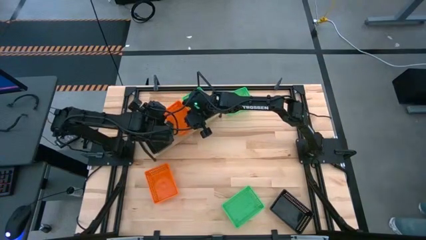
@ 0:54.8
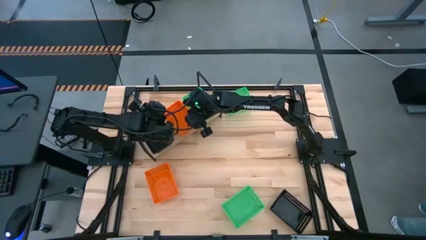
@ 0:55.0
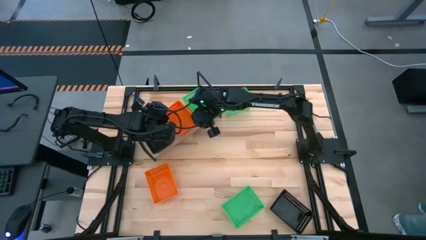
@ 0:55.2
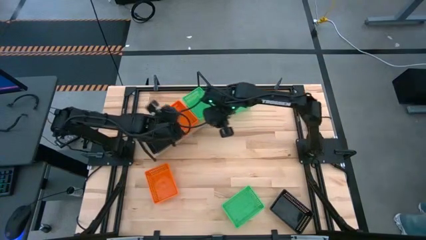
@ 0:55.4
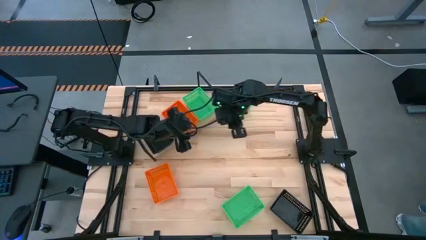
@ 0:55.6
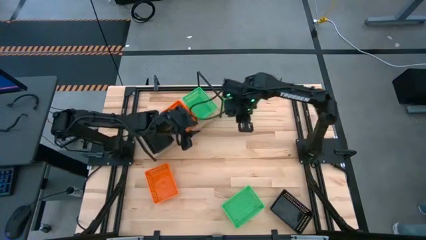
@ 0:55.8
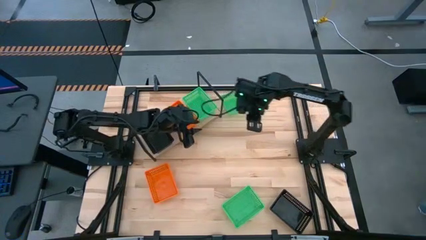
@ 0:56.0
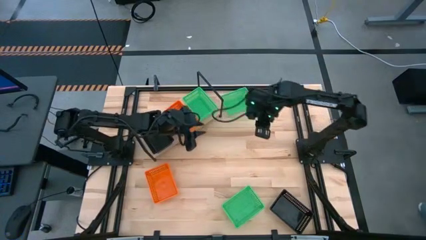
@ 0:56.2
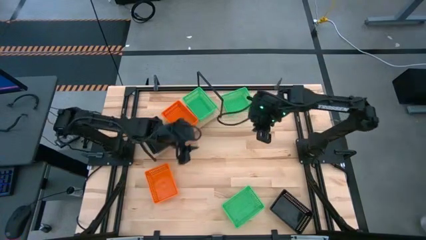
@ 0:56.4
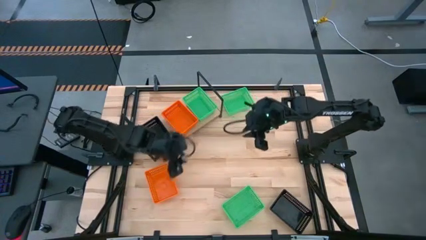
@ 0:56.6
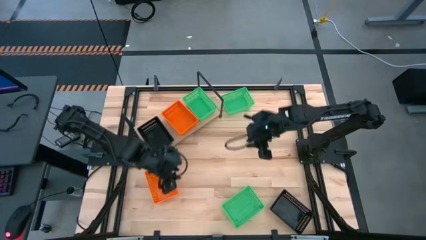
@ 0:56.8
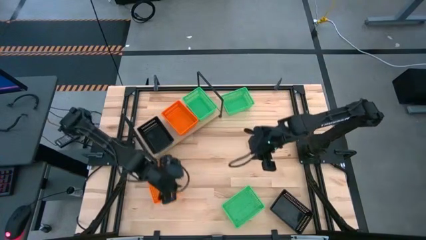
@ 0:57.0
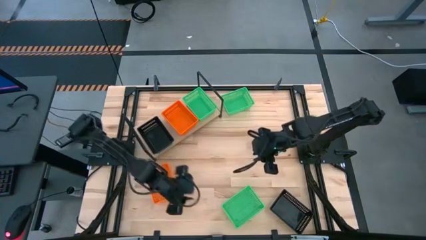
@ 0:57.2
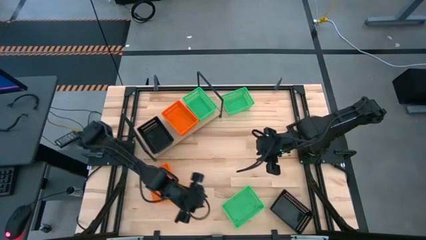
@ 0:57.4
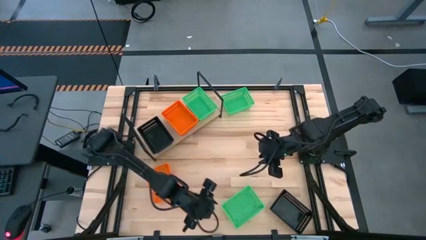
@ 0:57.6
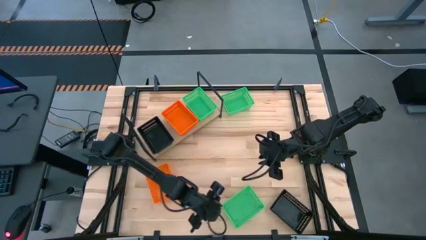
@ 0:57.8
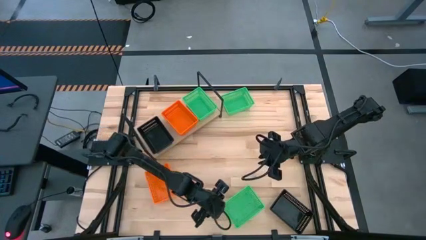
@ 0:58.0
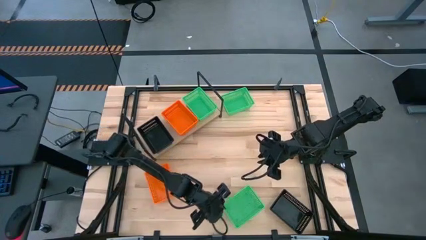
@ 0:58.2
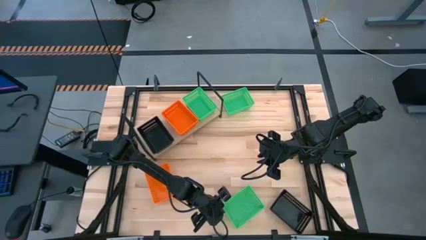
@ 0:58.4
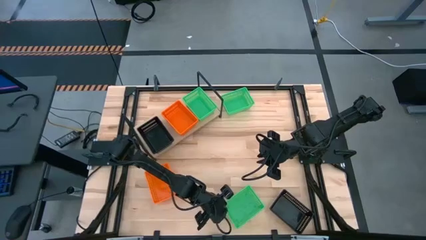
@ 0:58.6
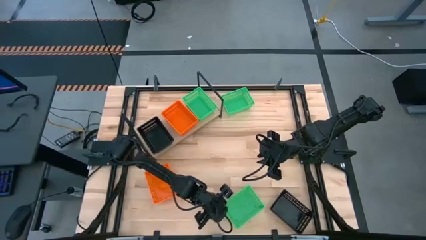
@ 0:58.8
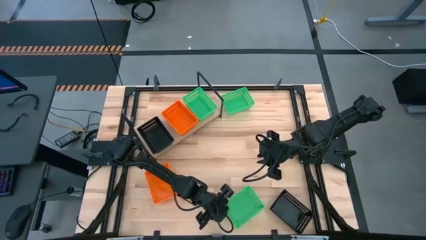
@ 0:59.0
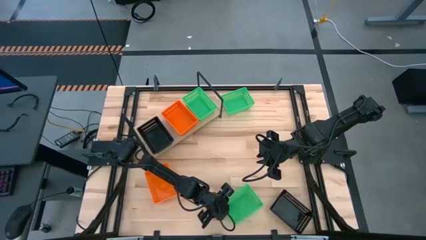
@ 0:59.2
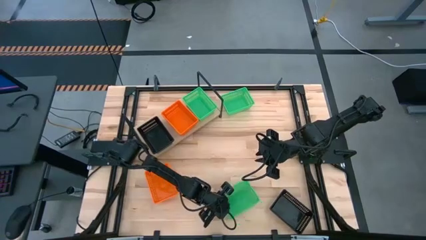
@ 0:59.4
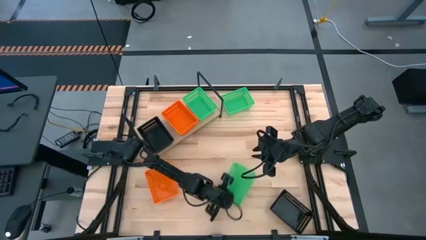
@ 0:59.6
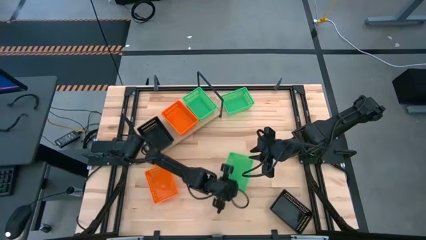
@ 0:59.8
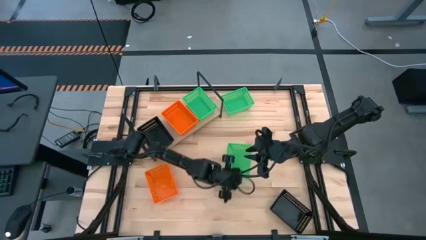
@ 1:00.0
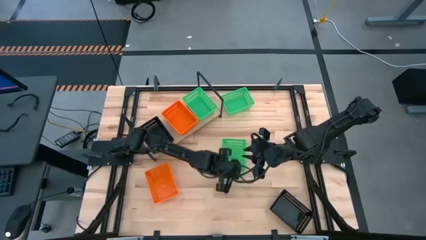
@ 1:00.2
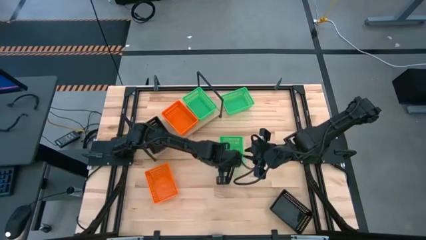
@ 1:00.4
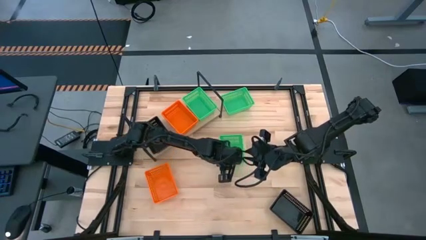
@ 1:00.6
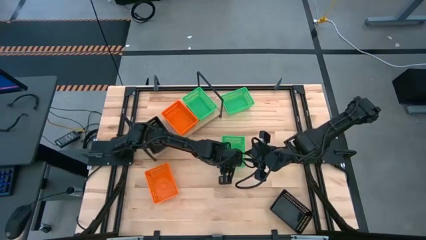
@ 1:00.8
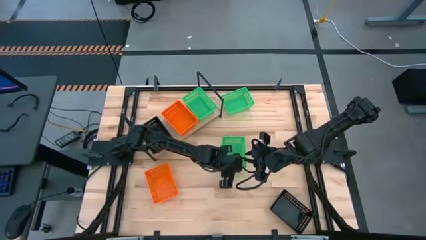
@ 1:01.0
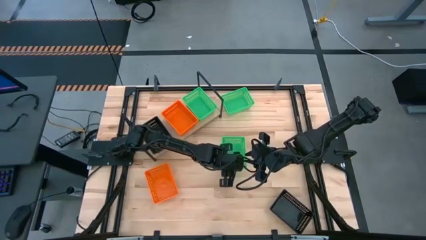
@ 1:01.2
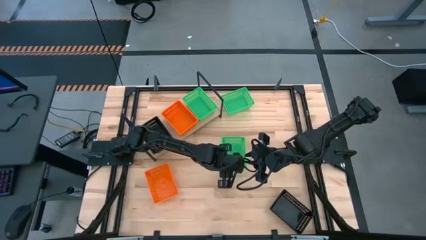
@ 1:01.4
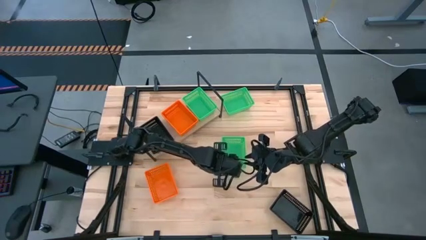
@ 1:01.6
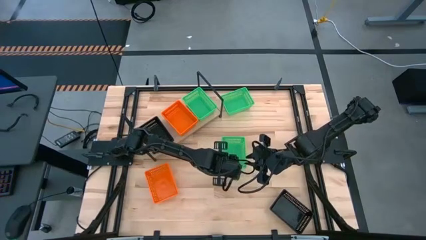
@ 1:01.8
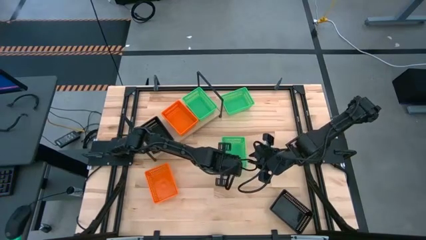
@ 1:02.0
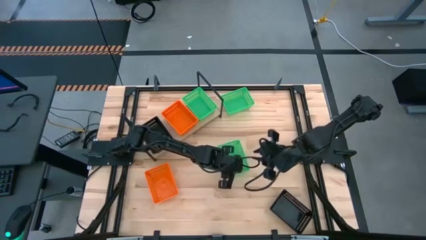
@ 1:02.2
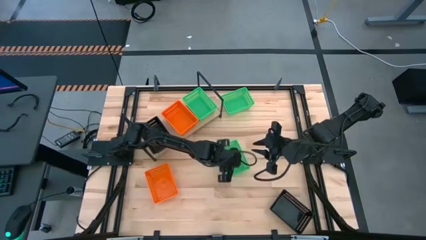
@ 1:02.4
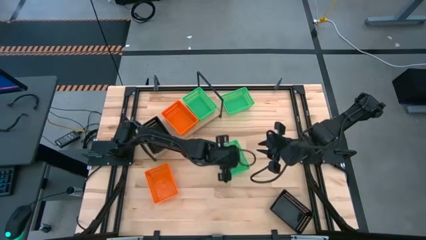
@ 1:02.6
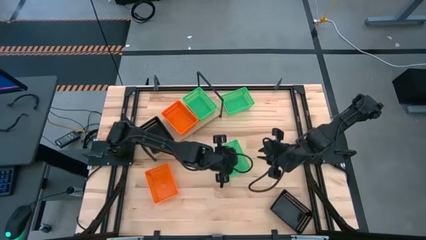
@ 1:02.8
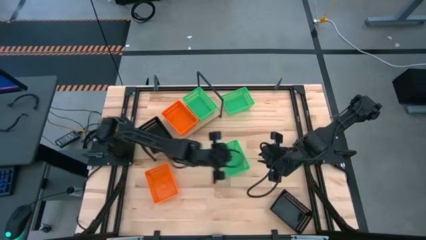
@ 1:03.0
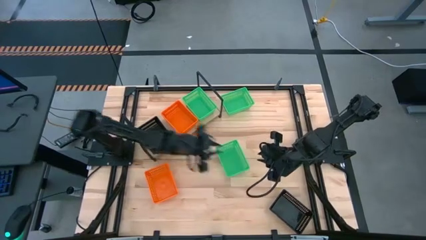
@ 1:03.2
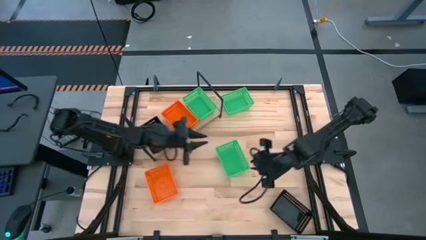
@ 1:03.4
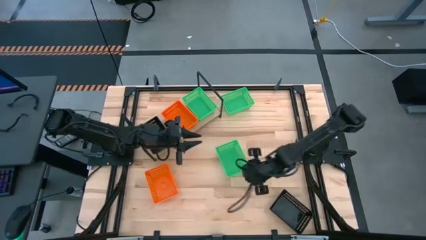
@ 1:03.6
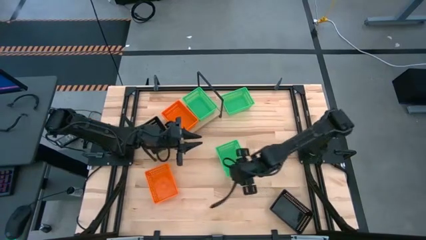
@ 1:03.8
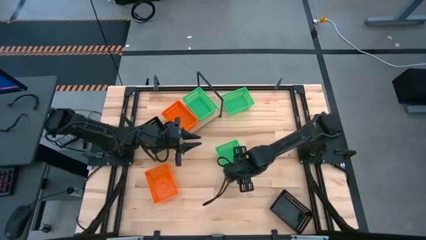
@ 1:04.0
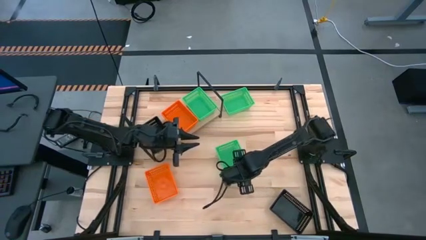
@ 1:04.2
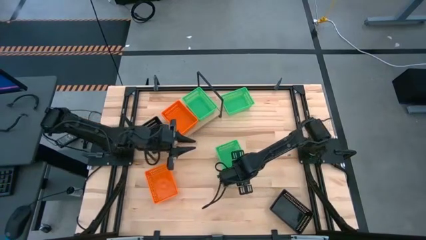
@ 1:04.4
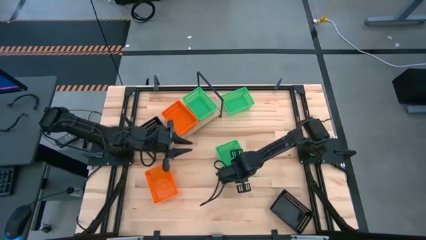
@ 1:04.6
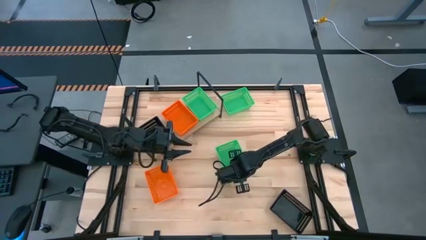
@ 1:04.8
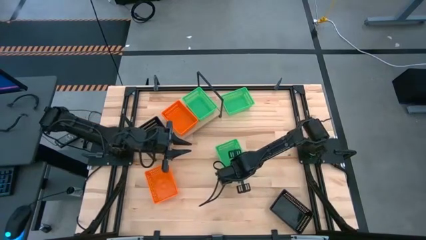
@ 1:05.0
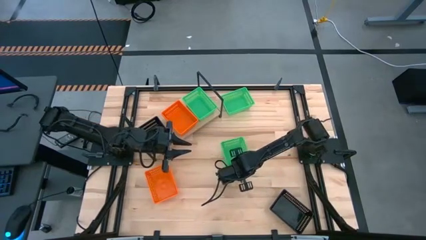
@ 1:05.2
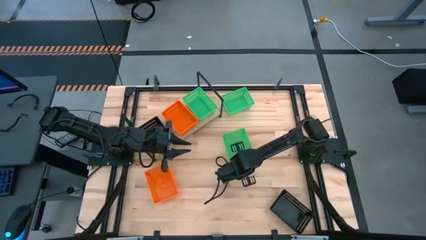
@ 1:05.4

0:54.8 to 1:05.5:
Task: Stack baskets on shelf by color
Stack the bottom green bin on top of the green bin on the shelf
